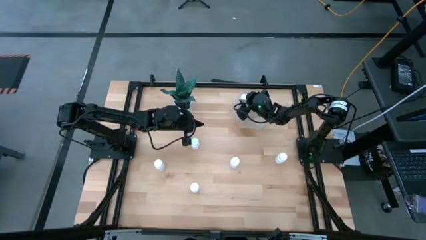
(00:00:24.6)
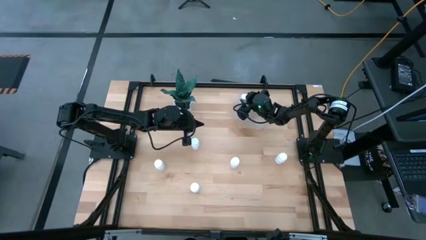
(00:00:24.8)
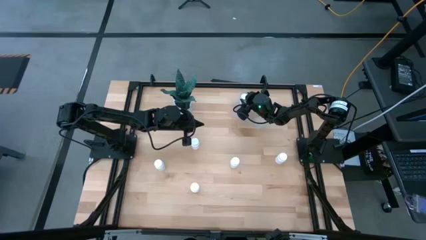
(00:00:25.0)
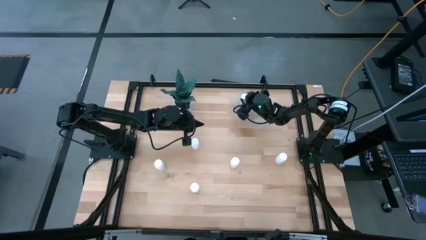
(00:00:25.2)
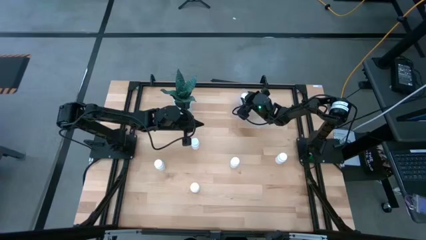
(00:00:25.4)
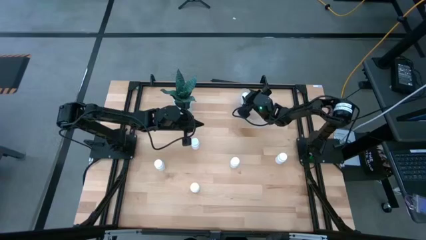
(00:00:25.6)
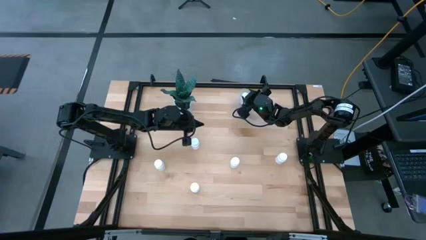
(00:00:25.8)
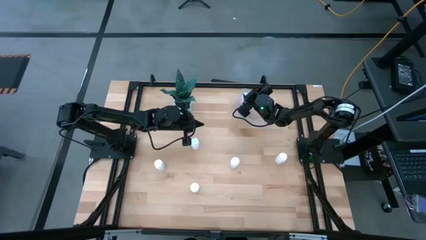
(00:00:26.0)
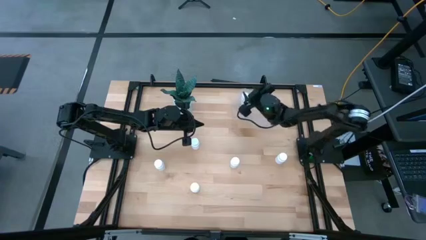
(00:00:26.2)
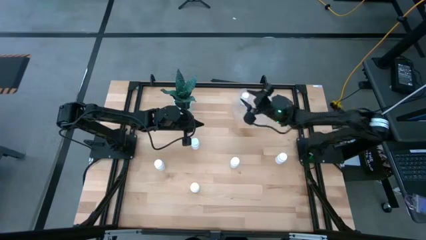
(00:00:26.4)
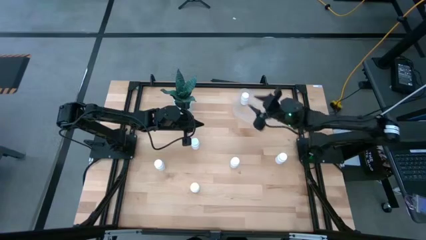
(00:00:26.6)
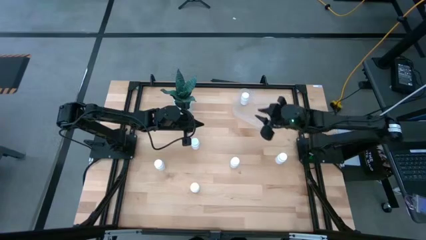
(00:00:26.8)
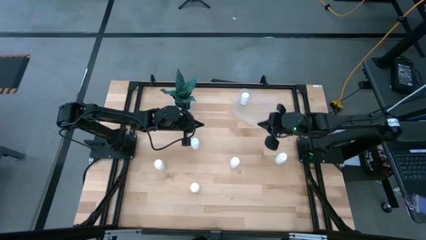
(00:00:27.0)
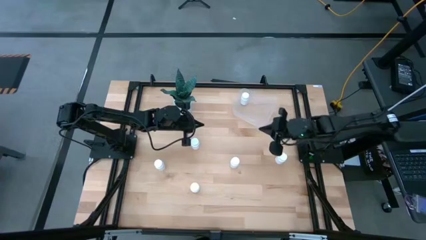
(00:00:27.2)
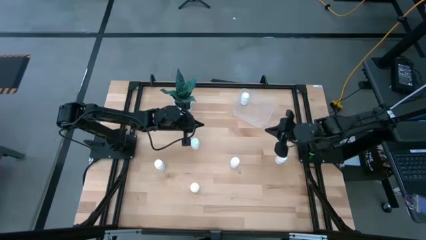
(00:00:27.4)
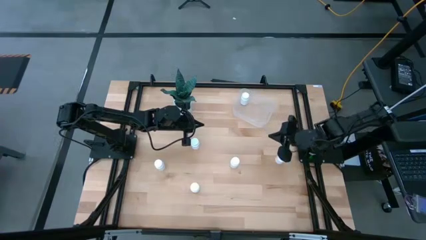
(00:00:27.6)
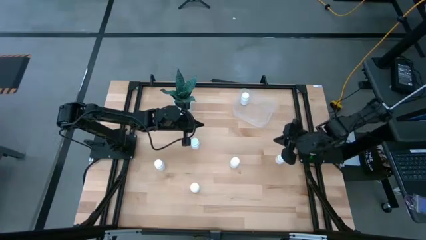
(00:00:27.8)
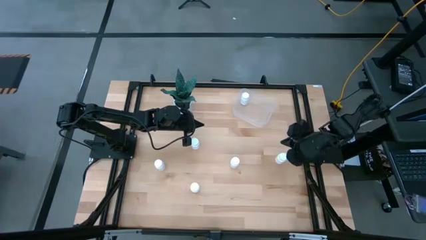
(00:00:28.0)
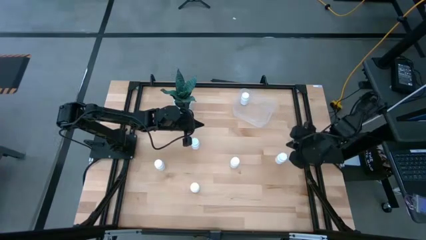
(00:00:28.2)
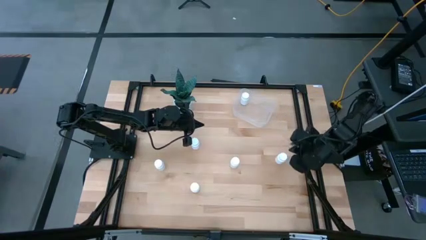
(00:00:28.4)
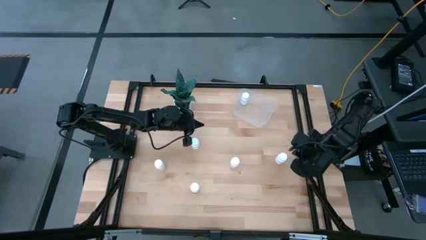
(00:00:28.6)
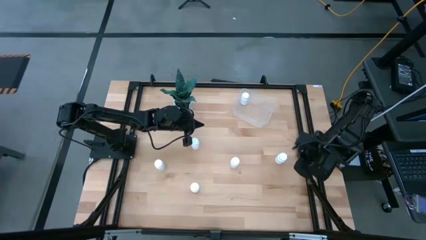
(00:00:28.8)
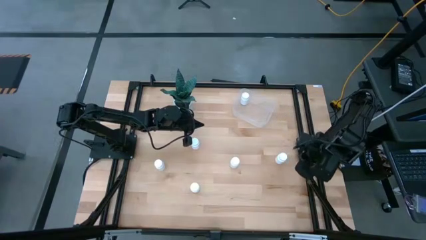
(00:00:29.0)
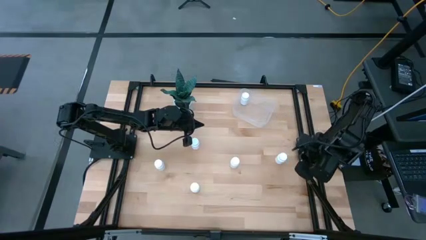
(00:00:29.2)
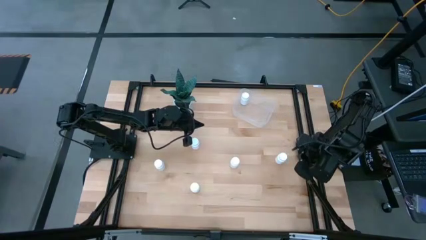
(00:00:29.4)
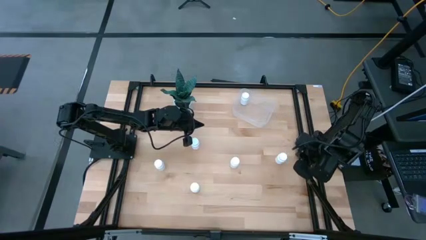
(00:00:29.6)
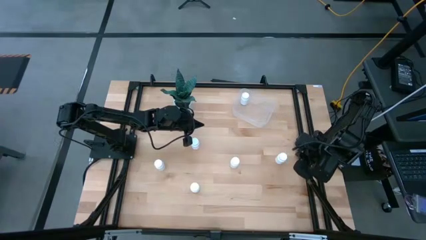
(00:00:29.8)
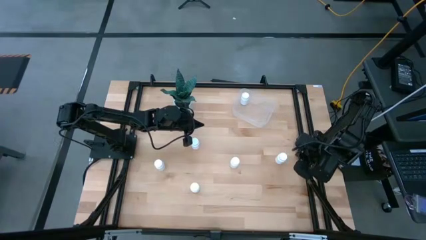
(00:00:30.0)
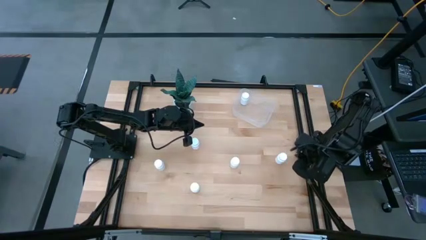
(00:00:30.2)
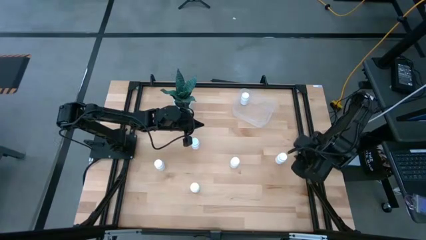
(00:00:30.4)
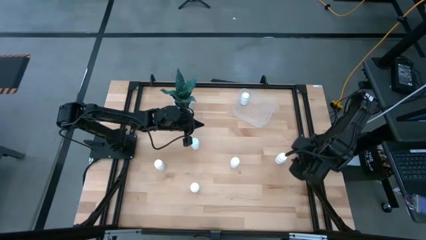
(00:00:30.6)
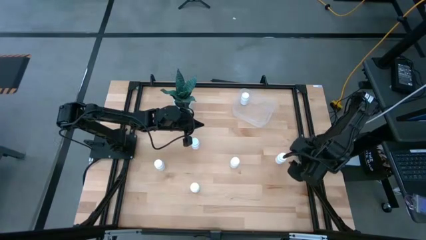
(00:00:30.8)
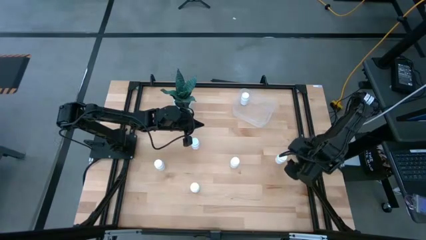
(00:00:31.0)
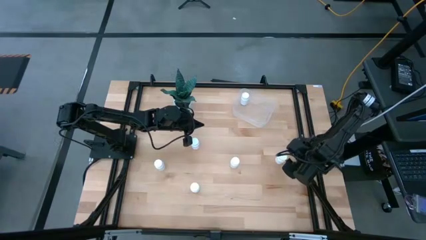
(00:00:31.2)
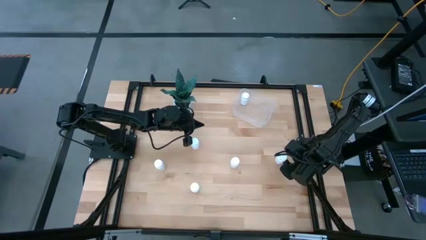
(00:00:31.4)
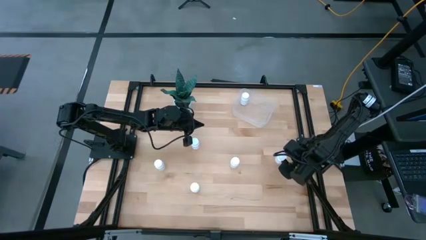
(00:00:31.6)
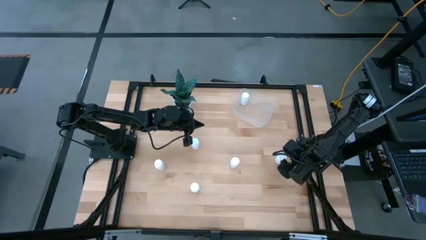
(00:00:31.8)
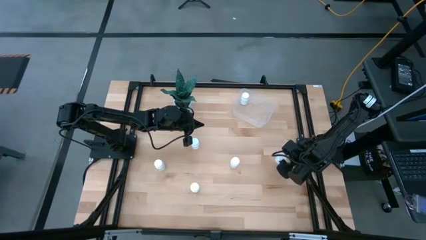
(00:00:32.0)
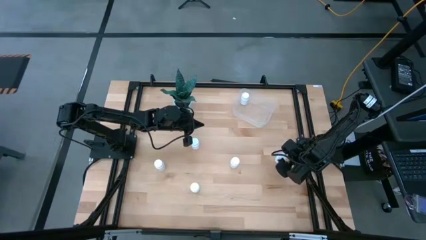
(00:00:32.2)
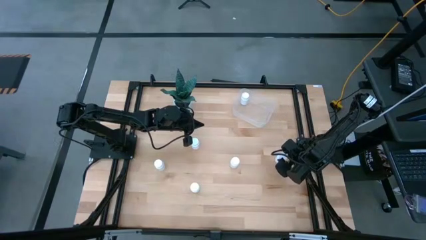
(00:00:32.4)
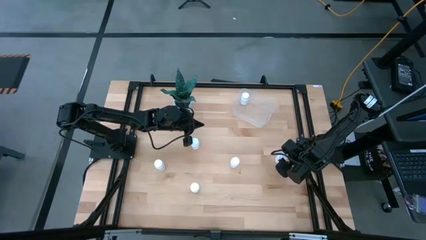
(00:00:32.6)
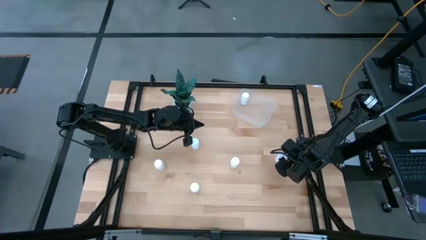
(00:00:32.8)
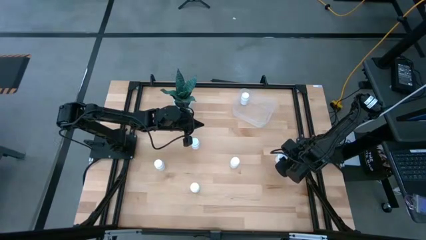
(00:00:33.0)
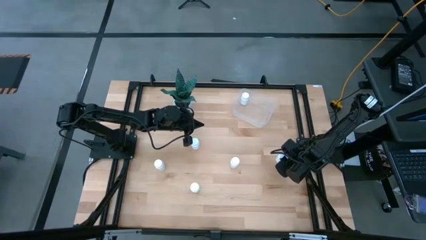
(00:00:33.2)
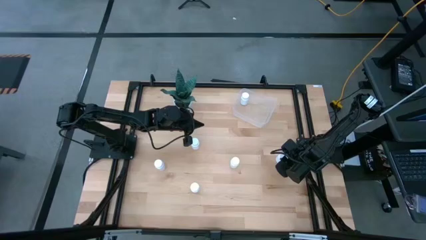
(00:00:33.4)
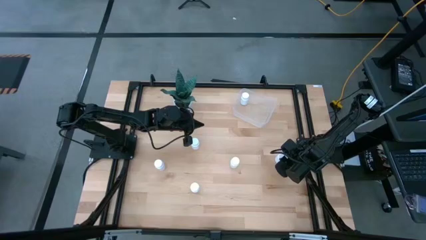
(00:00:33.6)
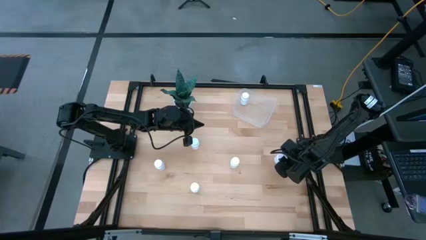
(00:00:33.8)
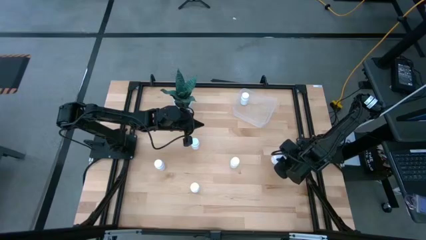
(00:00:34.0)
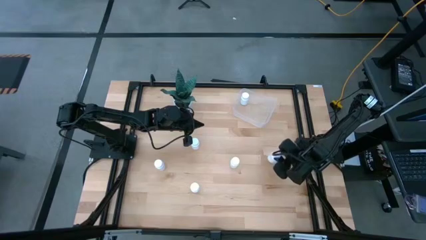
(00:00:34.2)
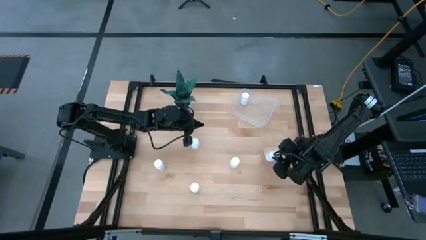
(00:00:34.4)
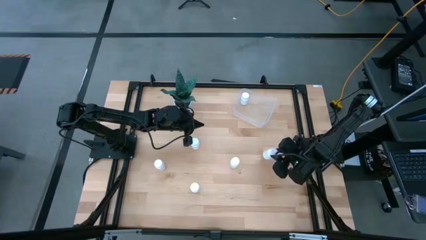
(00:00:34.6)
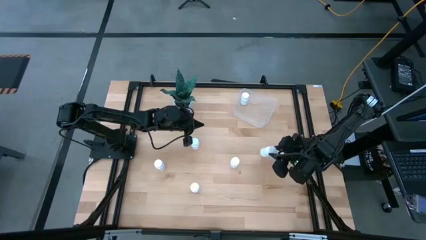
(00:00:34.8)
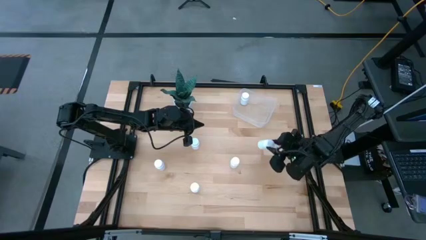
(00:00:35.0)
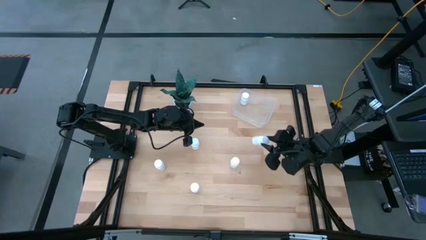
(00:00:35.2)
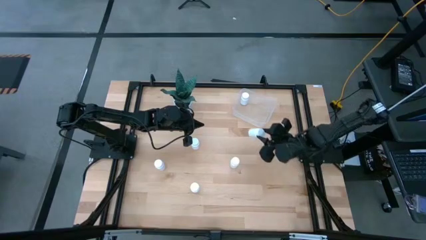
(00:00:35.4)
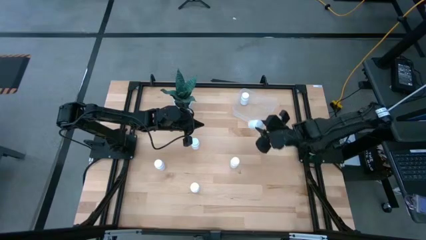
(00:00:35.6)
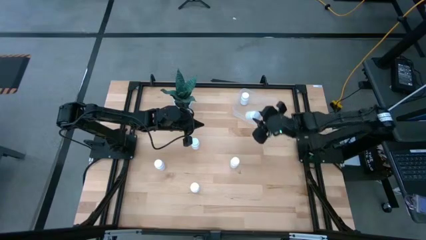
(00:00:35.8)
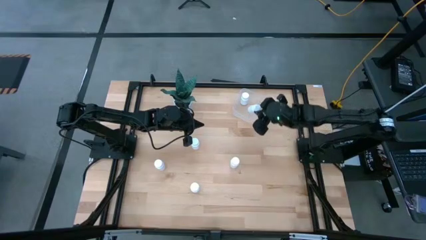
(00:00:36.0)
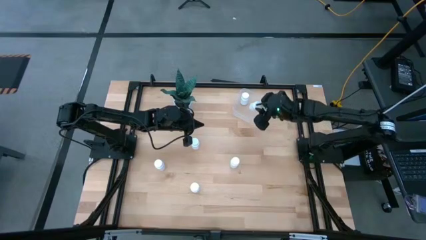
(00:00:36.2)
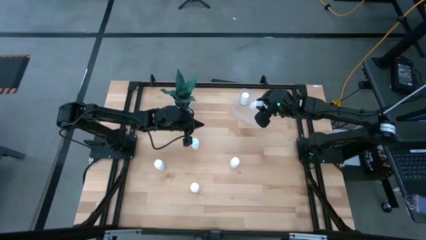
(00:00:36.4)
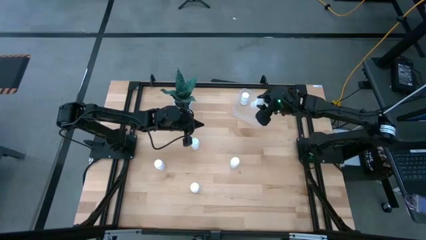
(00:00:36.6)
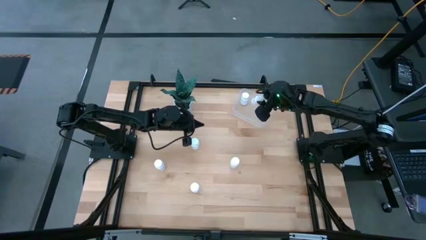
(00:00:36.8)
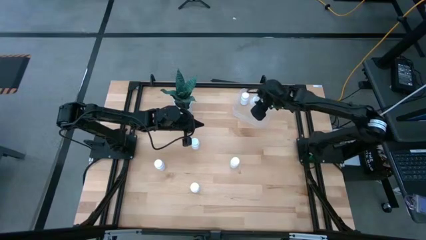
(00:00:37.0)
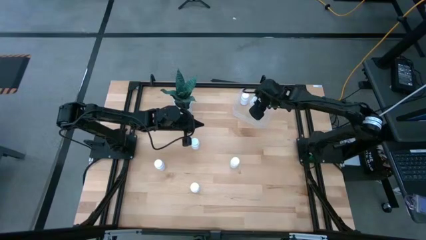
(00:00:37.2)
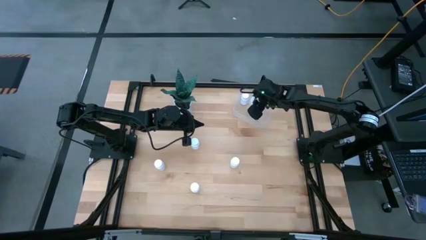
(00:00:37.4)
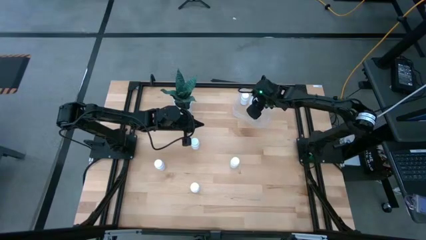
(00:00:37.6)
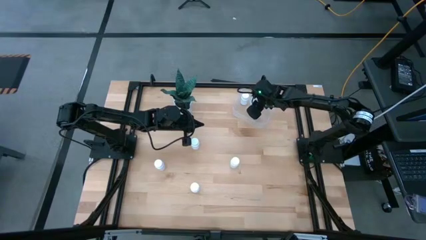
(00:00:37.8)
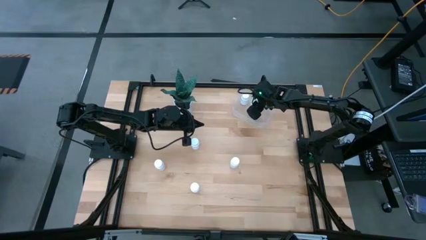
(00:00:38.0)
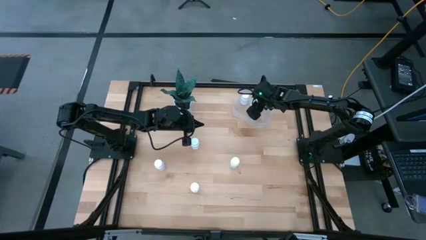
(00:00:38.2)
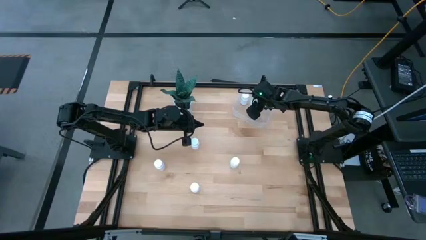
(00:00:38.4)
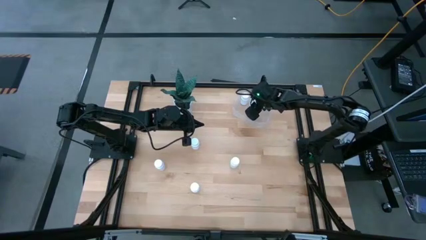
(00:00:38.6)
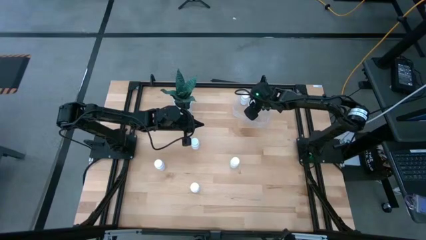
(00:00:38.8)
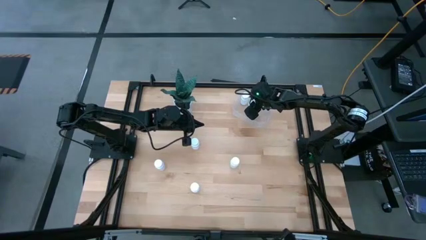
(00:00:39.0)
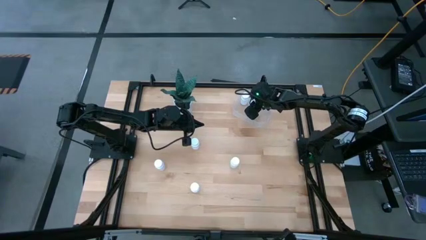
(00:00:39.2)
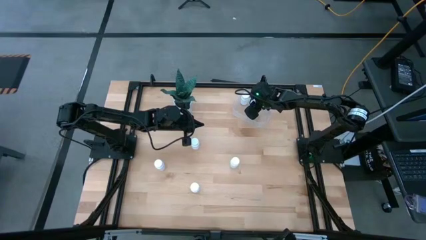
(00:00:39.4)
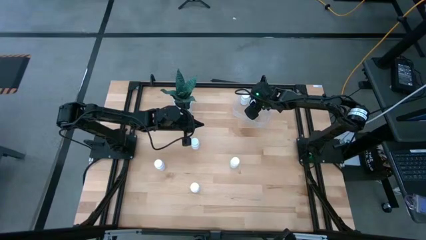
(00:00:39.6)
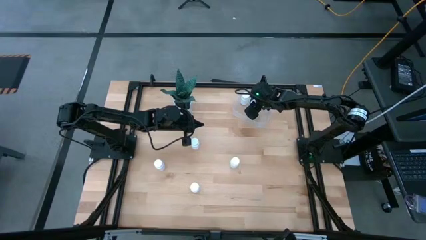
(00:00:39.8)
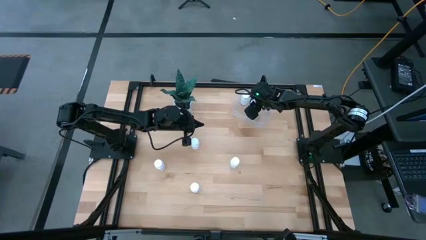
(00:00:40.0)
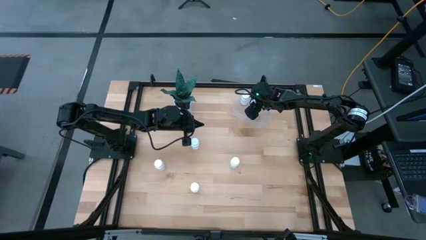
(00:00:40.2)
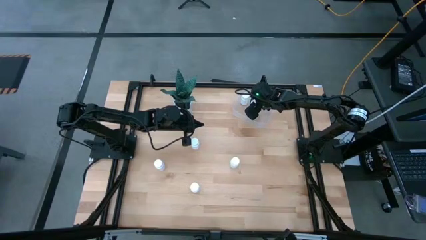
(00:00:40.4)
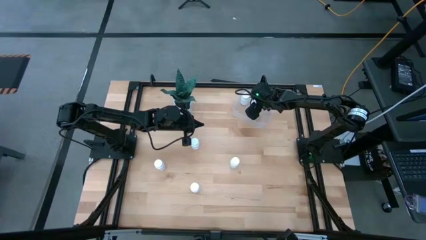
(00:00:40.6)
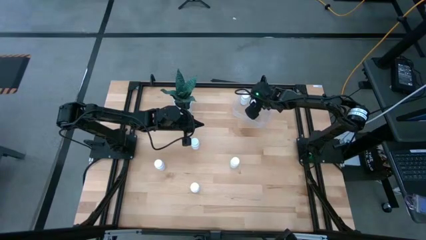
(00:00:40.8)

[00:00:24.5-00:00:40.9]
Task: Pick and place pill bottles into a basket
Put the white pill bottle into the transparent bin
